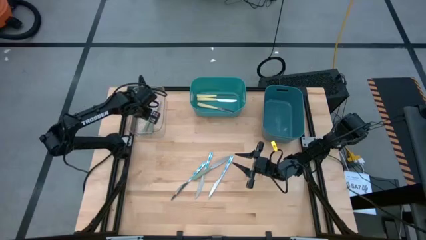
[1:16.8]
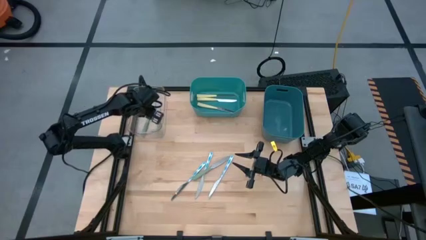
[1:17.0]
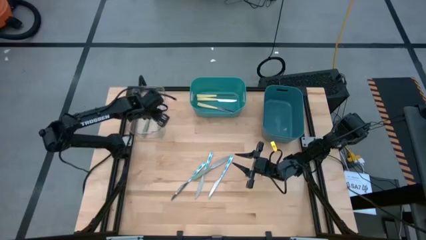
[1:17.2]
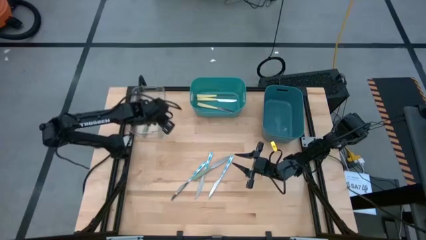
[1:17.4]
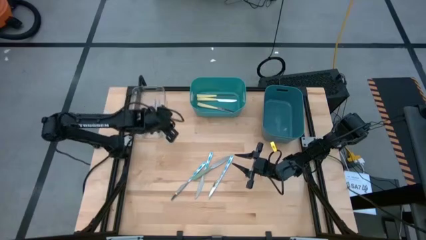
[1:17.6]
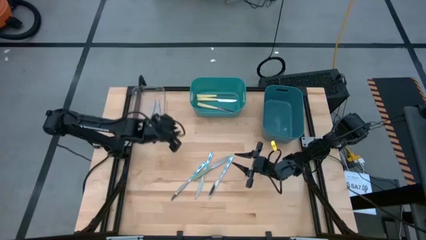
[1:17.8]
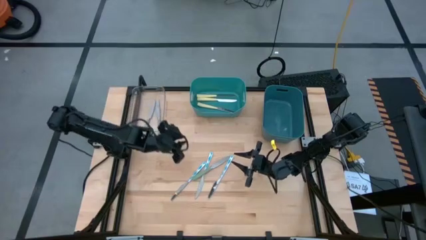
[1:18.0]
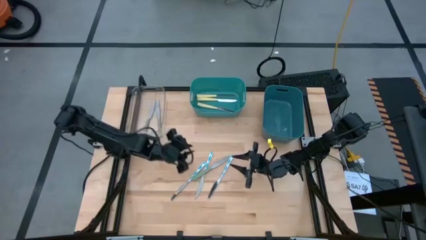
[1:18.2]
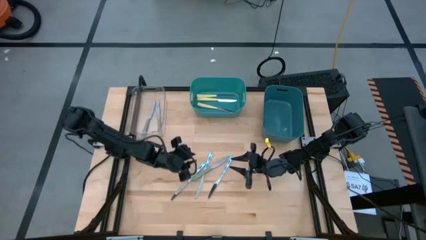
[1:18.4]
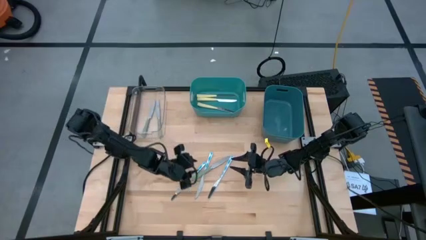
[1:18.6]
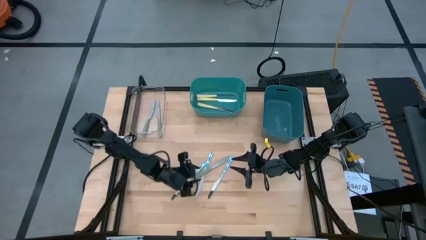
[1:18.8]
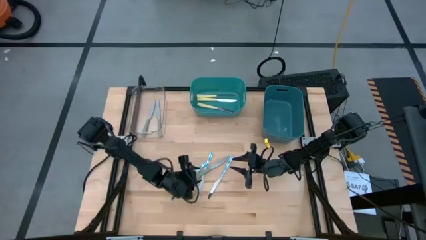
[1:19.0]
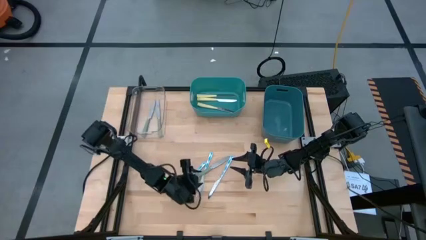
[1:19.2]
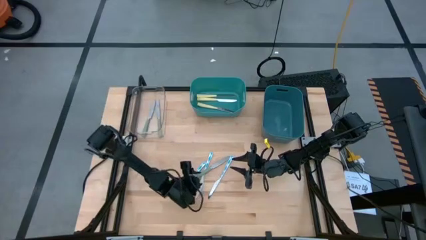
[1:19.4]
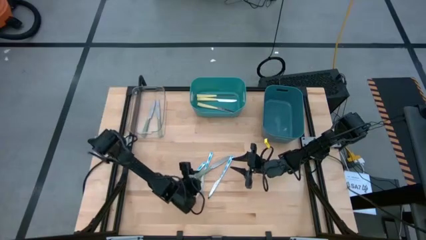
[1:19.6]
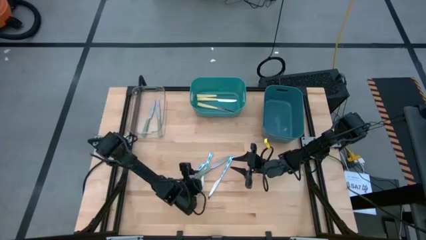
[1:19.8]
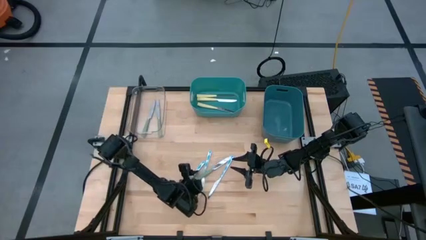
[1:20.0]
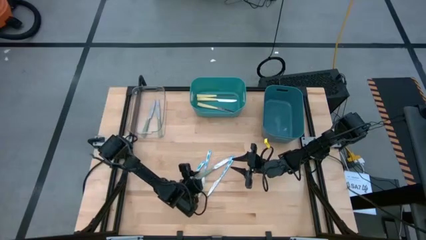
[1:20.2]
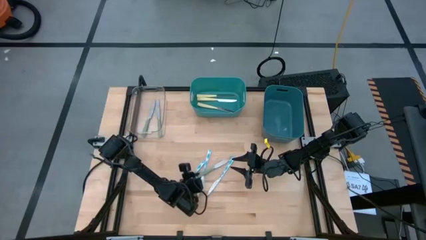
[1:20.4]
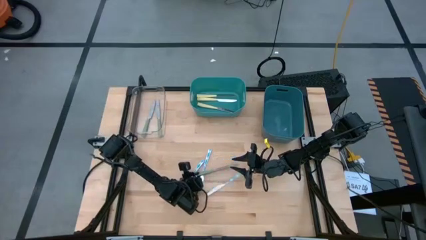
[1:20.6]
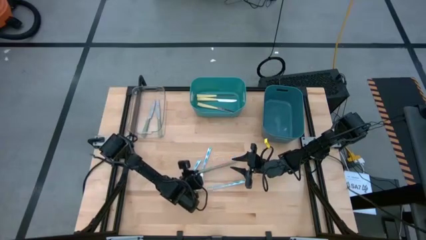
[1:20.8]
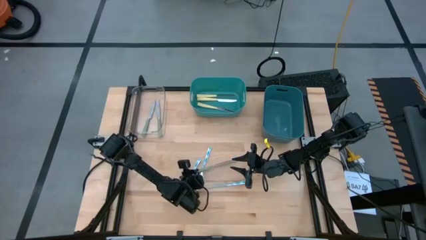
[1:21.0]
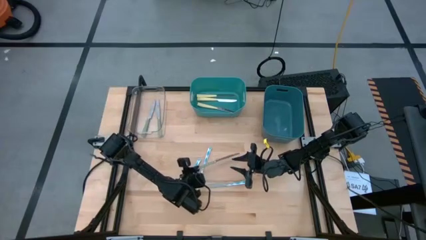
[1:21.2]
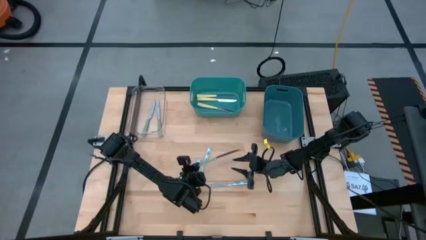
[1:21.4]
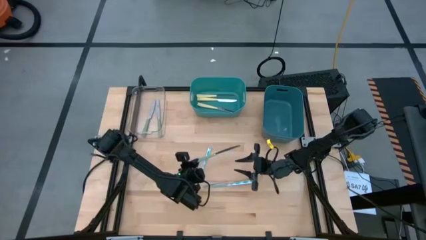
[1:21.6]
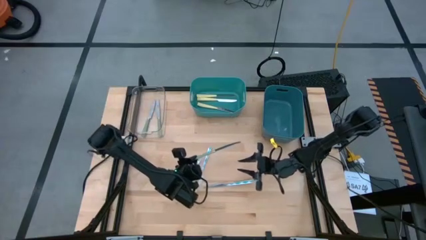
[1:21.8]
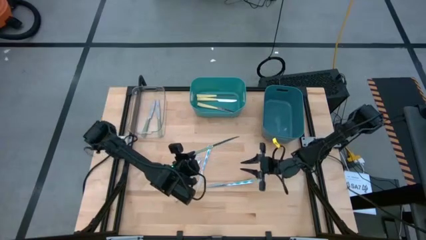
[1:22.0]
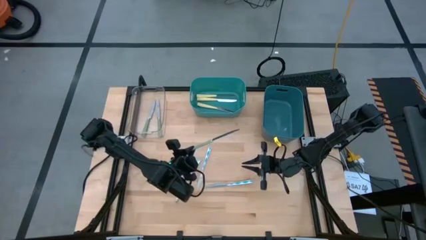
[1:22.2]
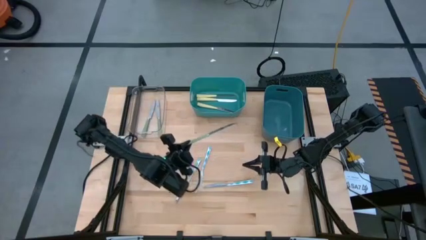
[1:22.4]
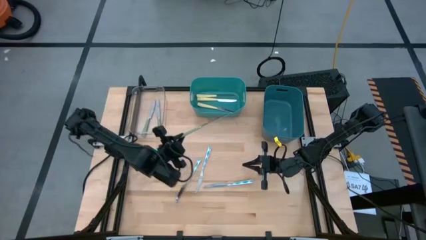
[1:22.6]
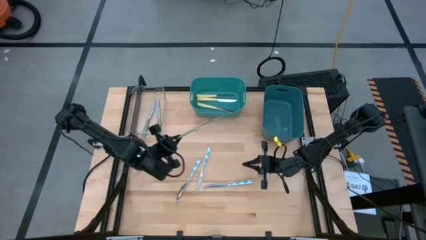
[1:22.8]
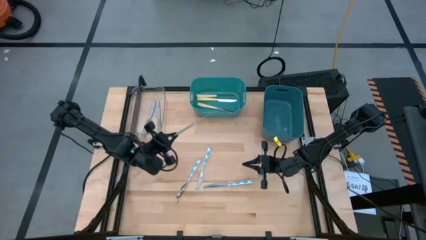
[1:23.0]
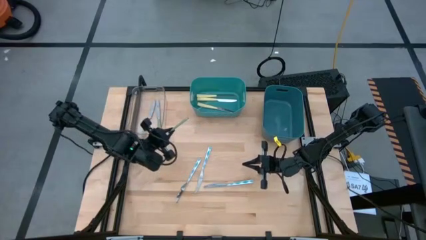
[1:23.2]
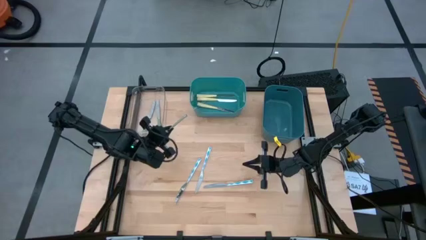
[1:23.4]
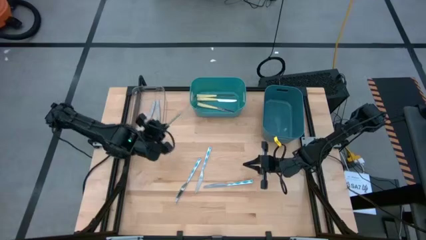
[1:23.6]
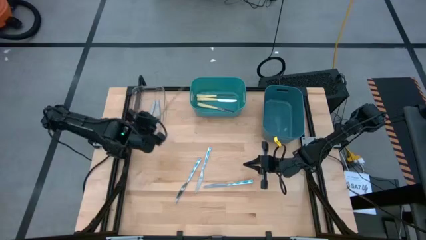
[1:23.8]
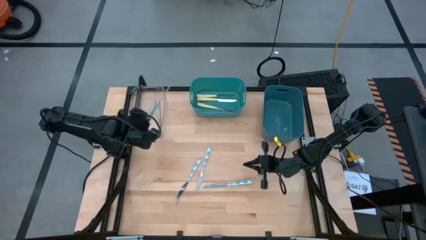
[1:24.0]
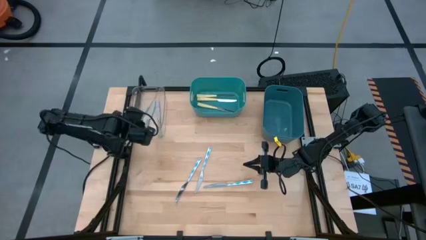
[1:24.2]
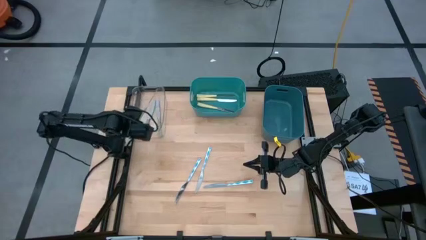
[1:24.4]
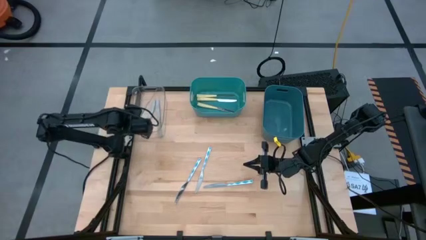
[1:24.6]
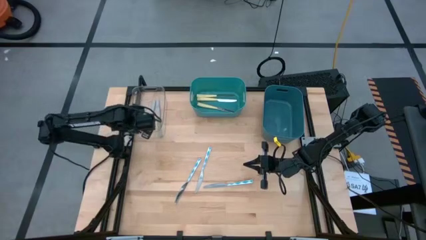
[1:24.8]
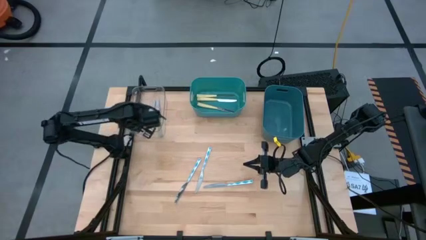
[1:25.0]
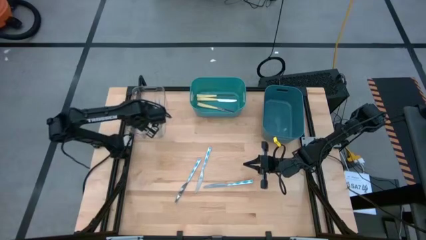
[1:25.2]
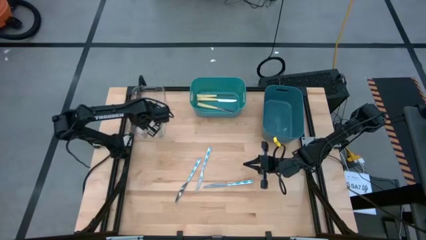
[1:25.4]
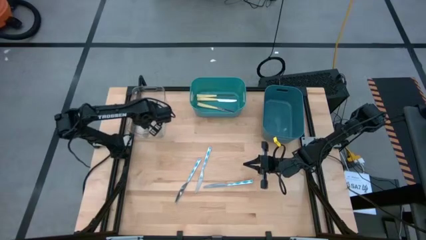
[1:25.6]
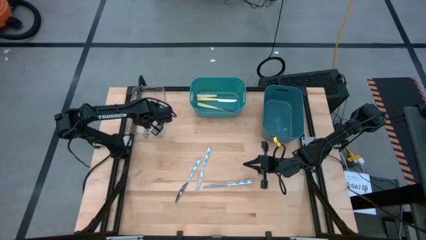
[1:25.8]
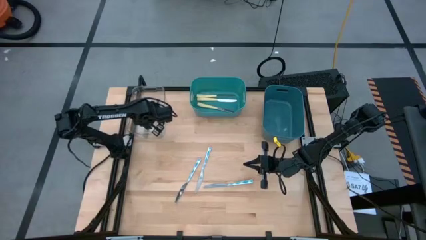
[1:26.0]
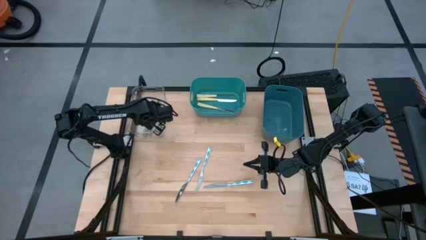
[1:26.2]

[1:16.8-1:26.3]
Task: Sort silverware by color (type)
Put the green knife into the transparent bin

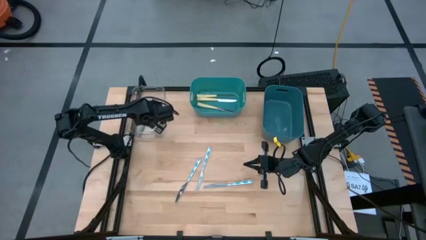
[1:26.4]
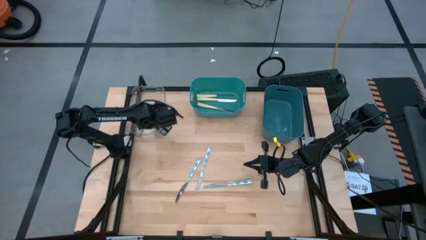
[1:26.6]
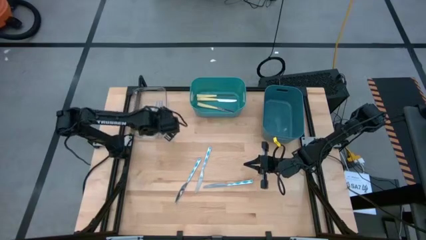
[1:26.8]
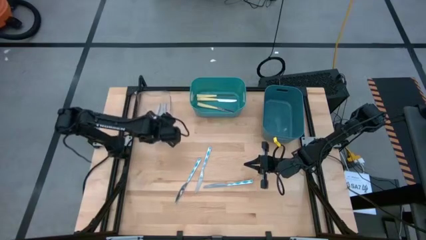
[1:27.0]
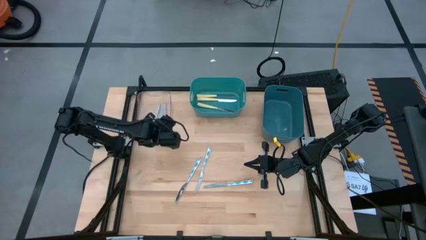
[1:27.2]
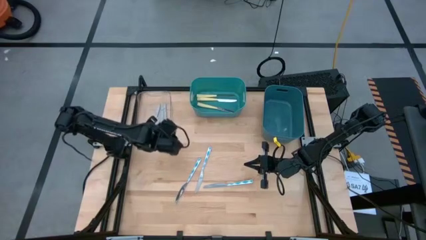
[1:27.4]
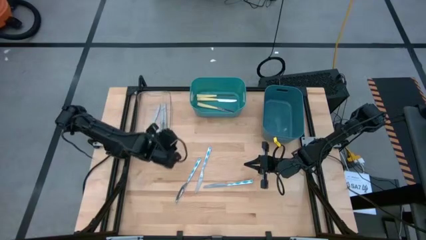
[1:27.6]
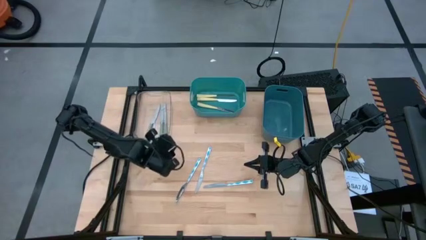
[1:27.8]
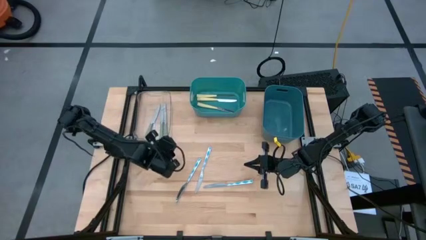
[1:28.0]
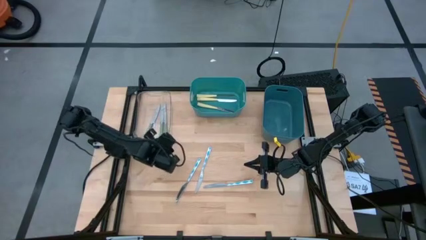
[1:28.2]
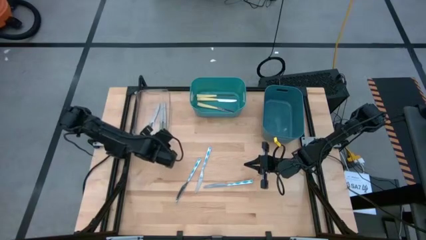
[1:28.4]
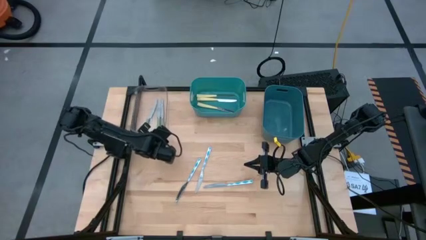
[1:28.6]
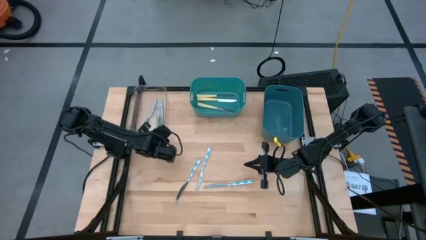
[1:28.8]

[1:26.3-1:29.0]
Adjust the transparent bin
